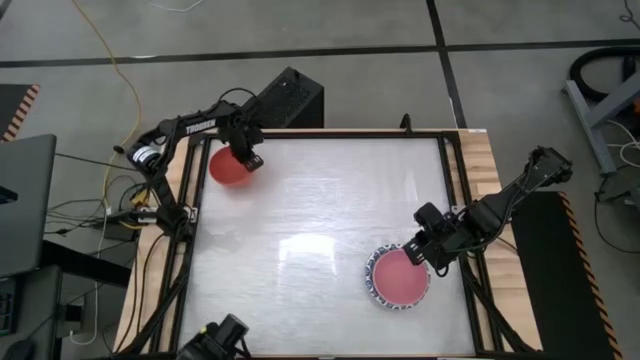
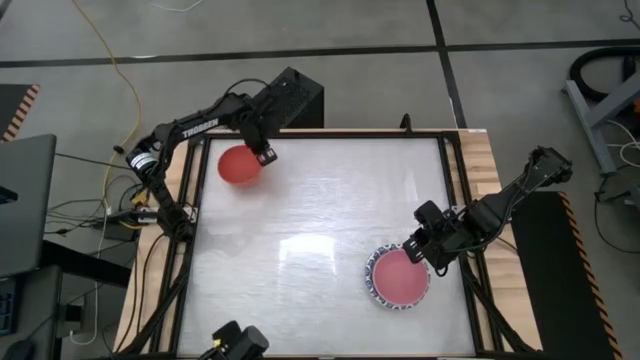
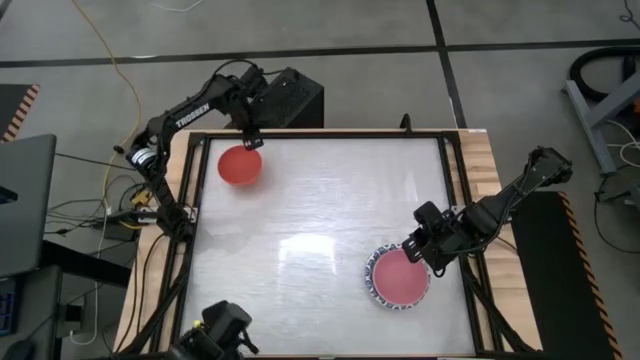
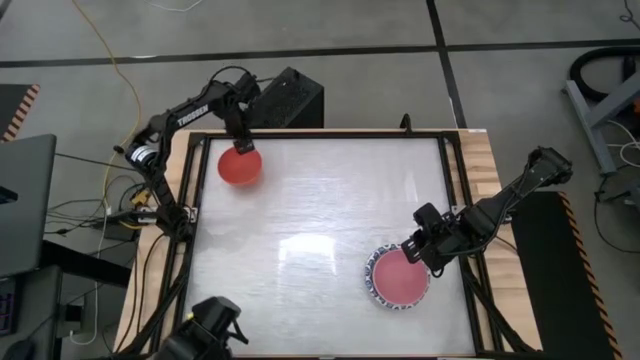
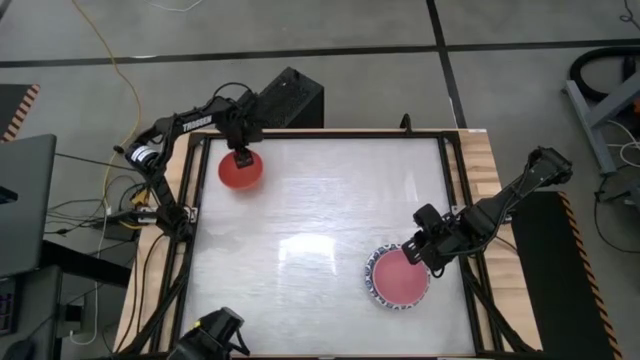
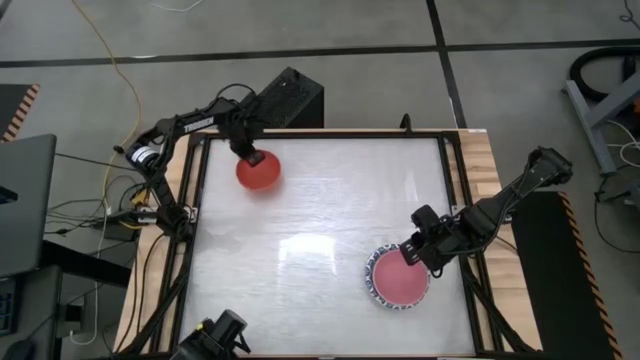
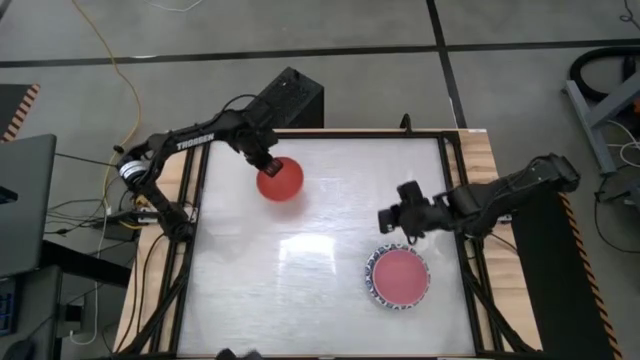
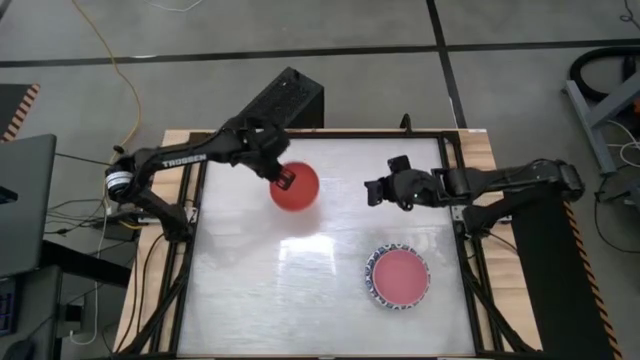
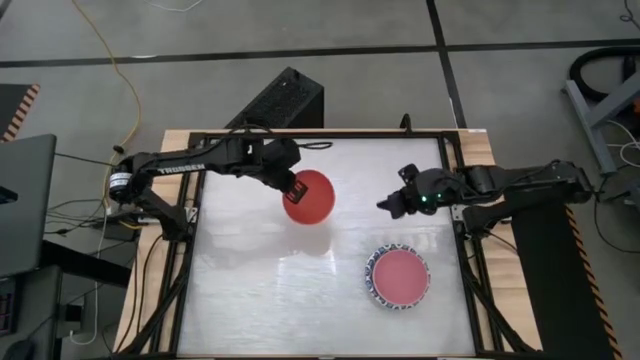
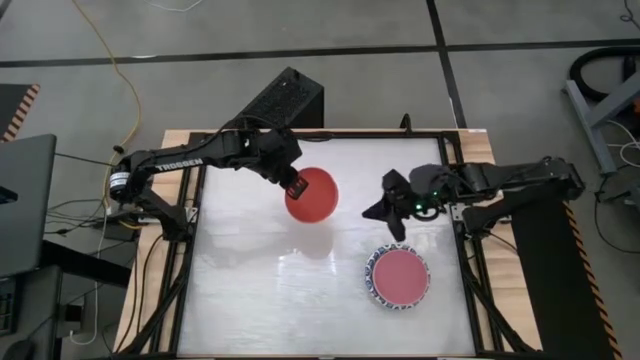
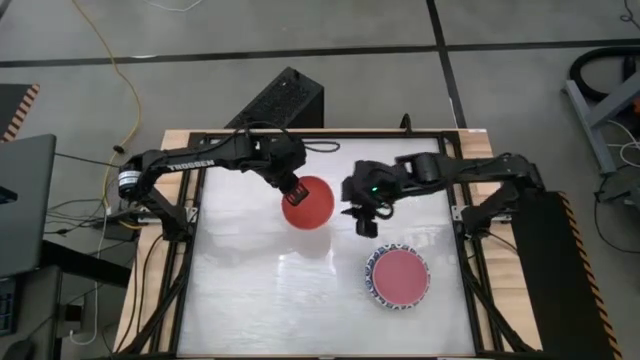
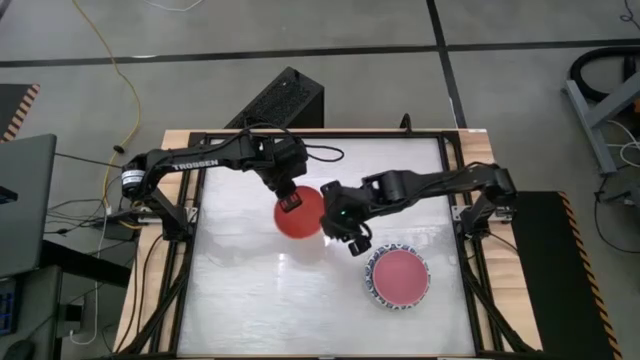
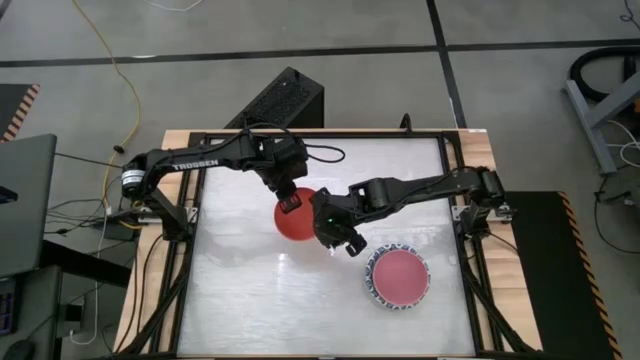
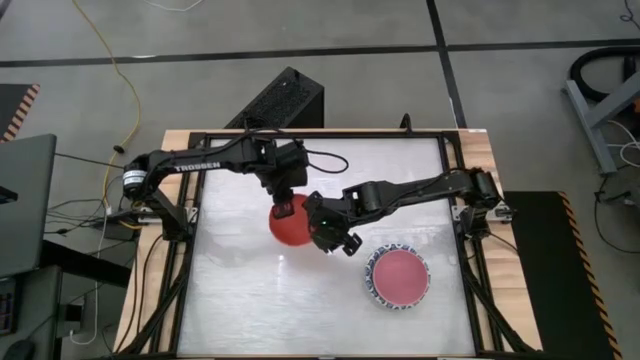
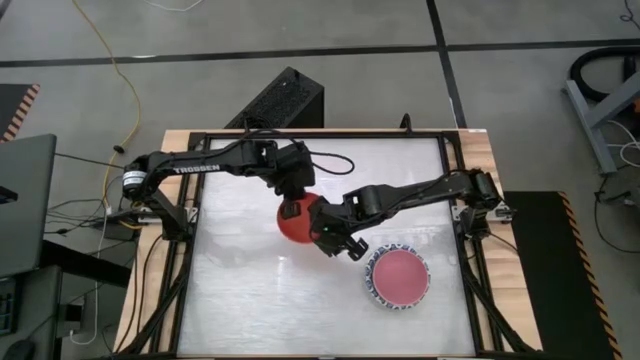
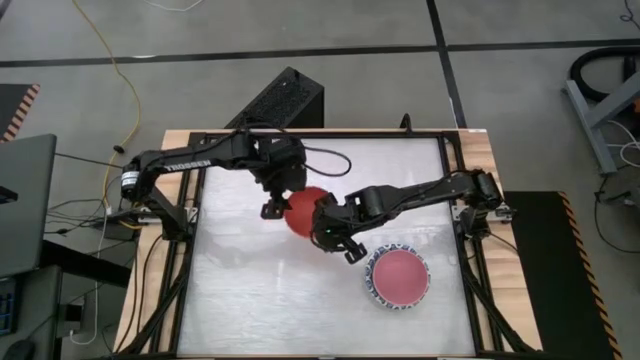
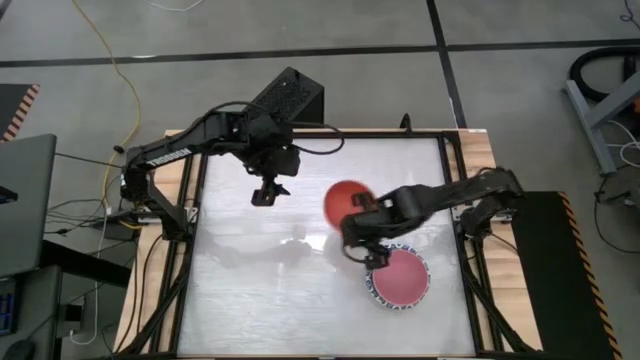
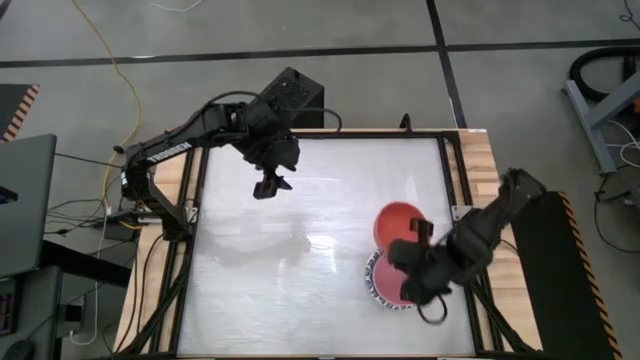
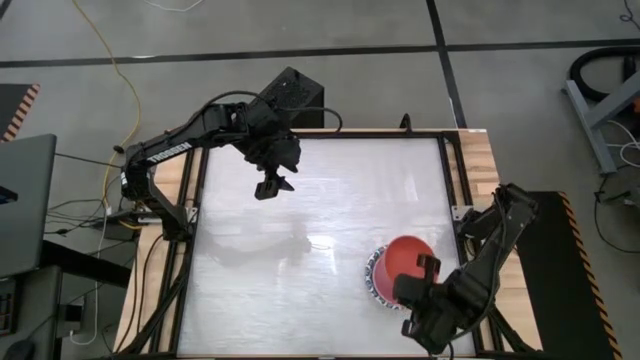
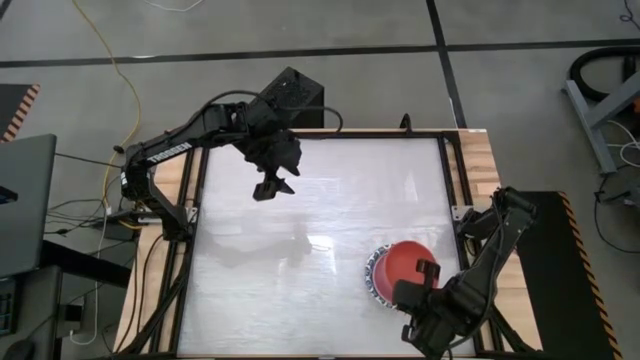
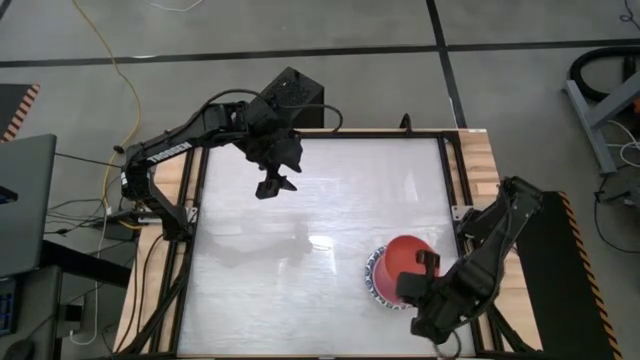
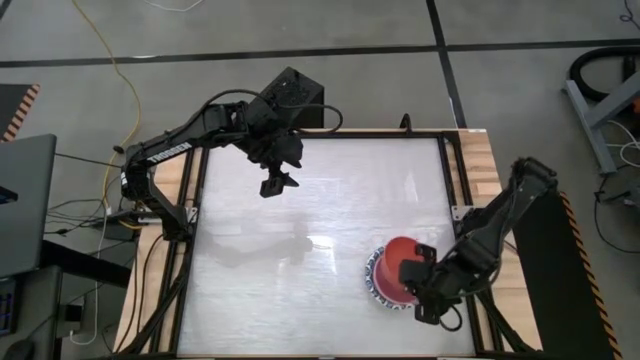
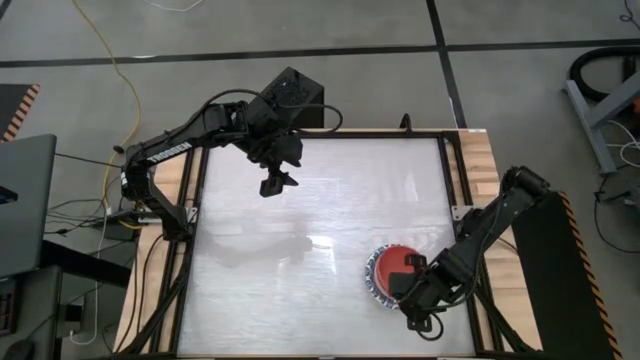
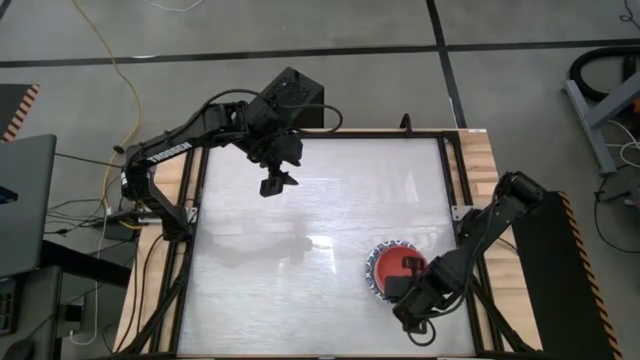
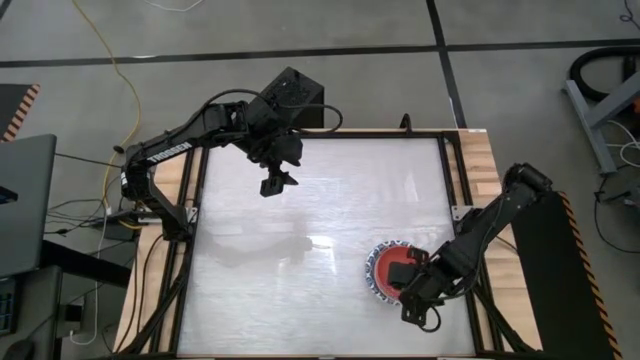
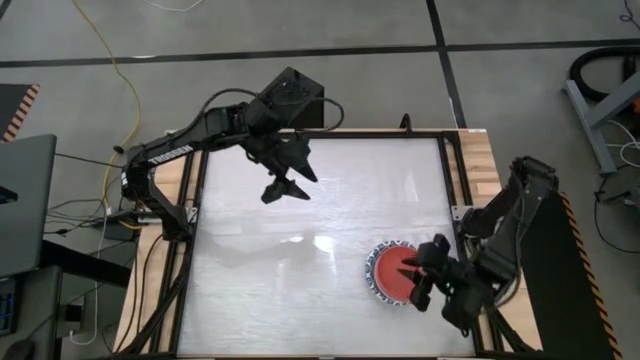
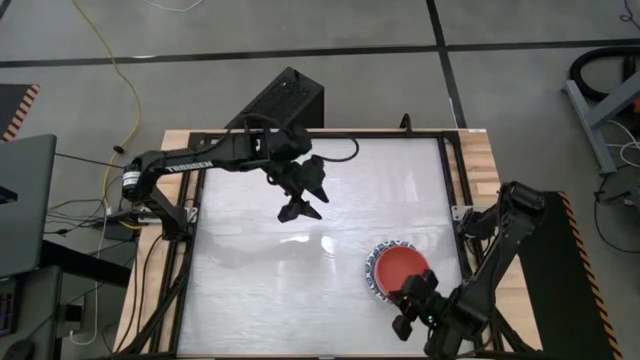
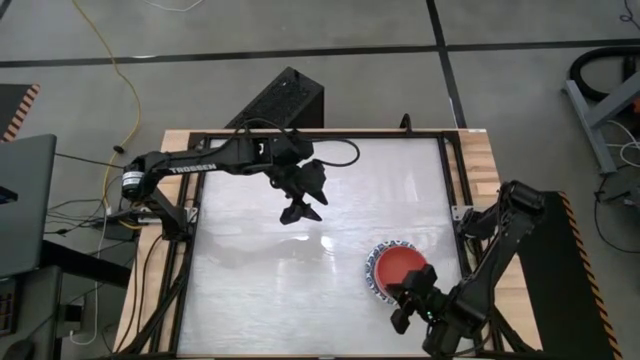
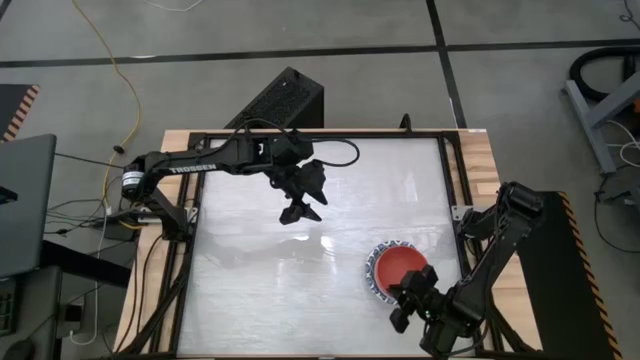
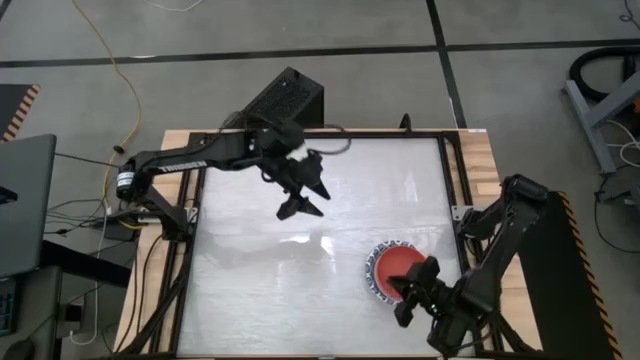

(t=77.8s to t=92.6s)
Task: Nest bowls inside each other by size order
Stack the orange bowl on top of the pink bowl

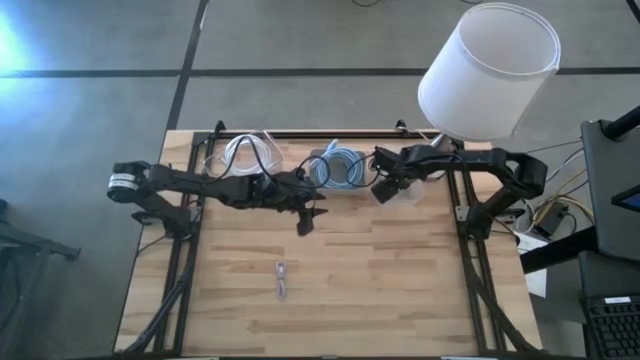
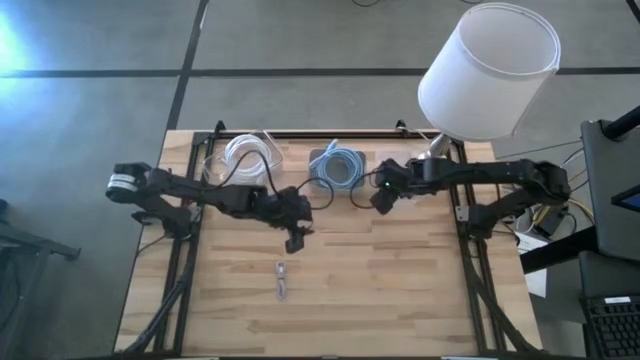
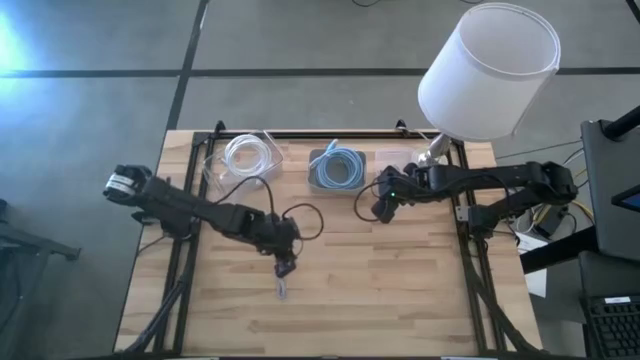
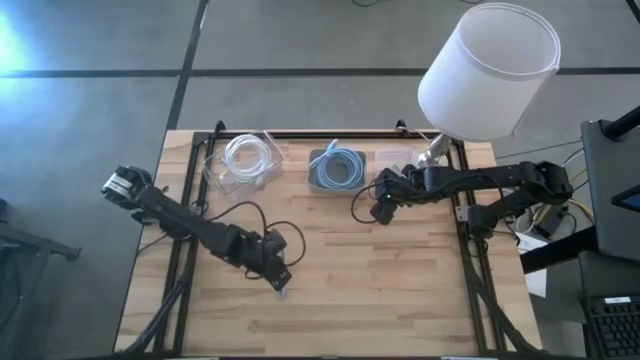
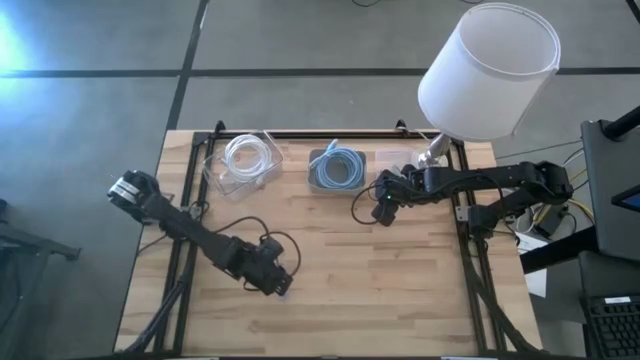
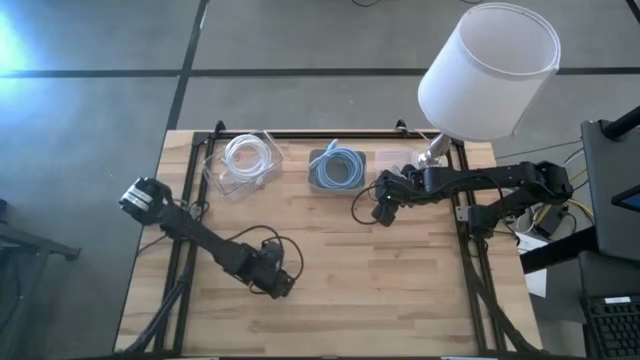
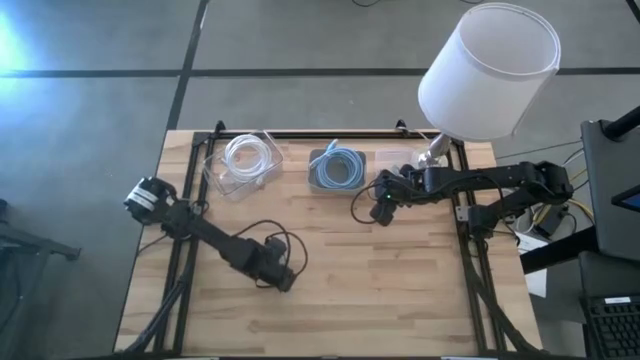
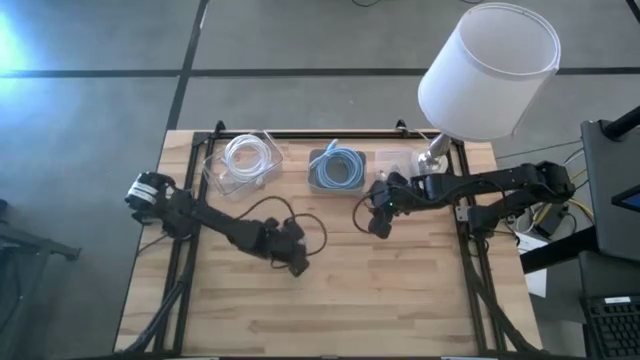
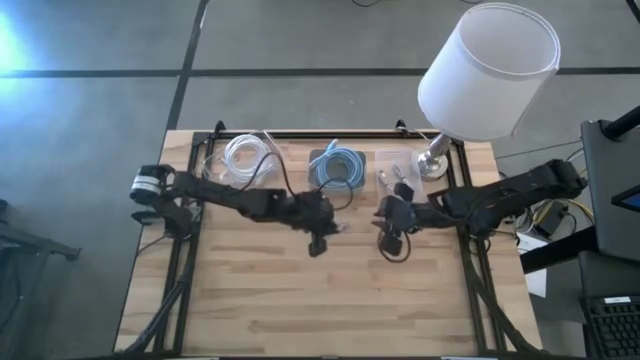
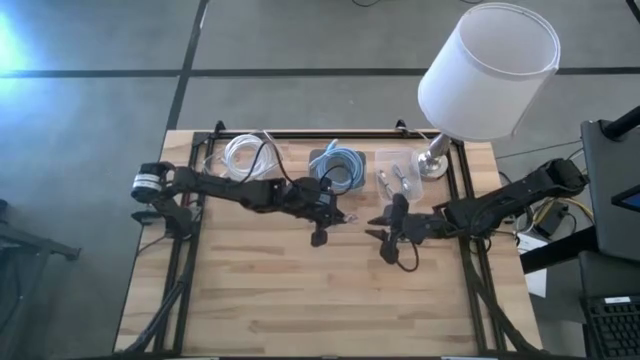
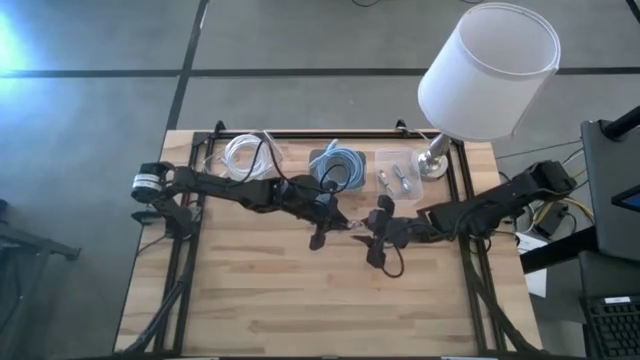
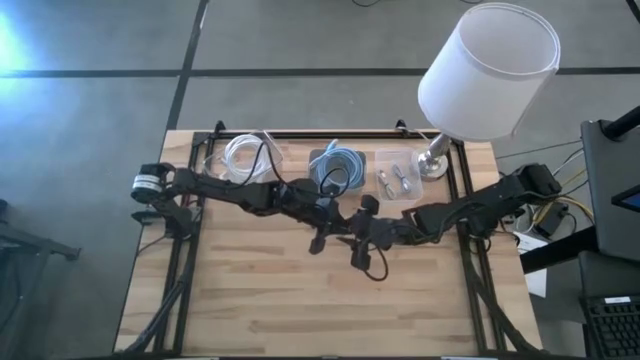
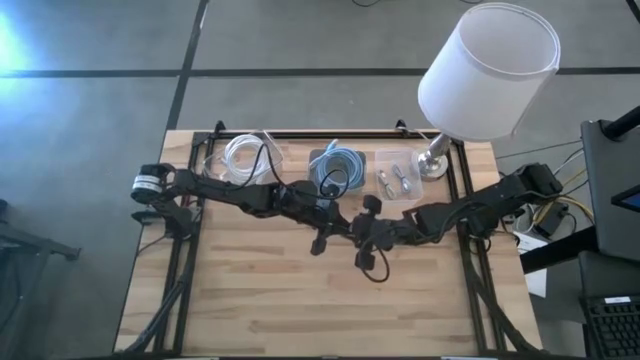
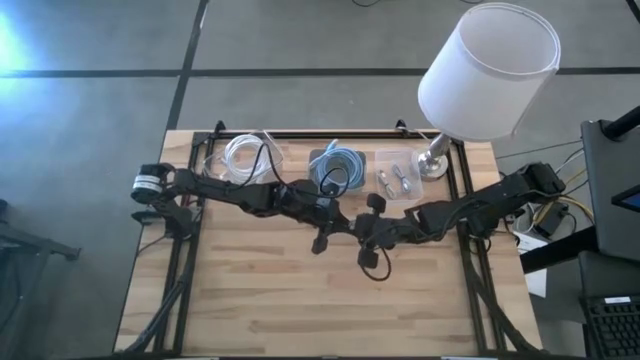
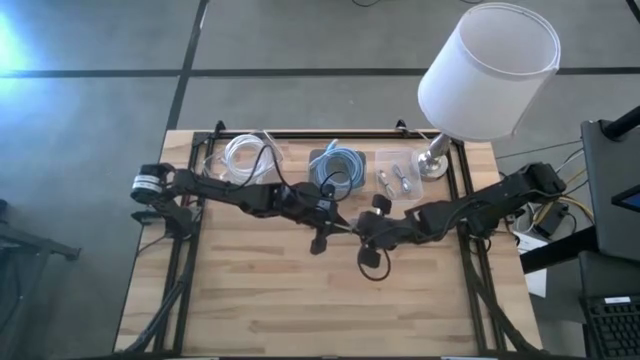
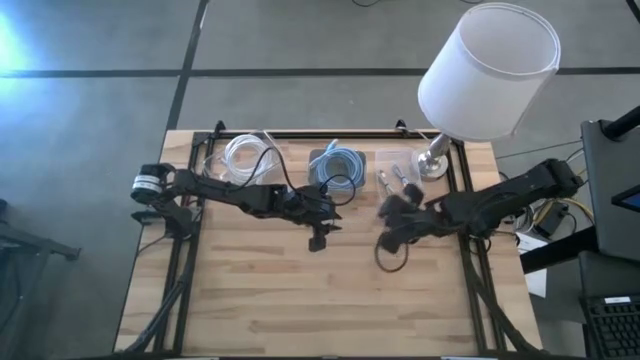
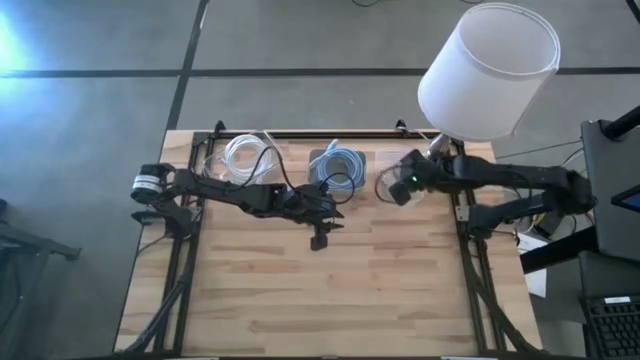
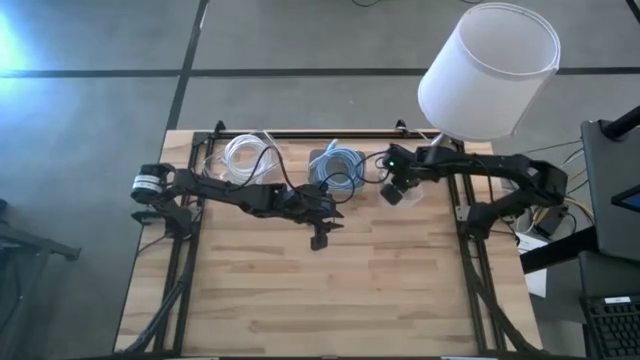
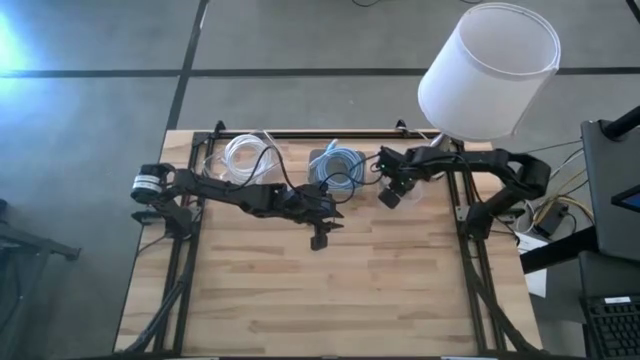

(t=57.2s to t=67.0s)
Task: Pick & Place USB Port
Put the small purple charger cable into the right transparent bin
